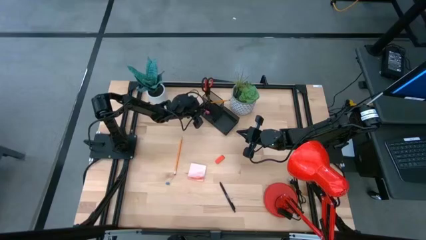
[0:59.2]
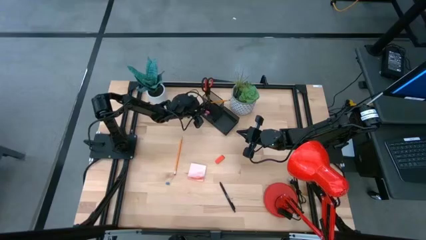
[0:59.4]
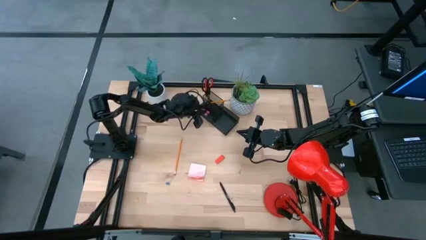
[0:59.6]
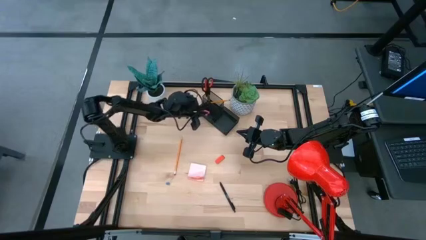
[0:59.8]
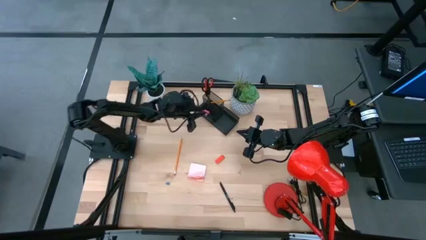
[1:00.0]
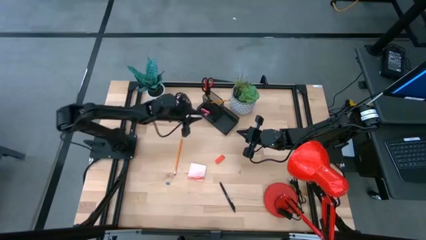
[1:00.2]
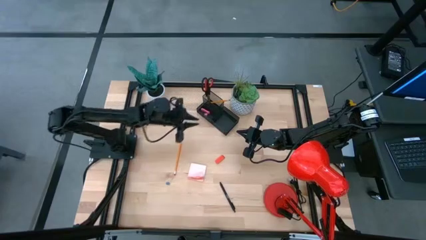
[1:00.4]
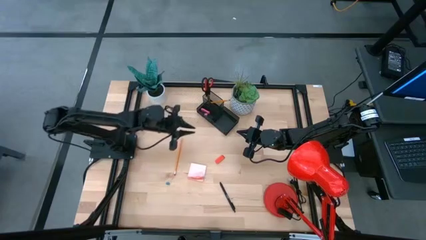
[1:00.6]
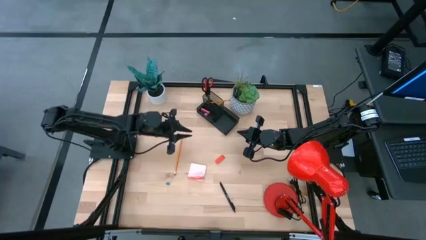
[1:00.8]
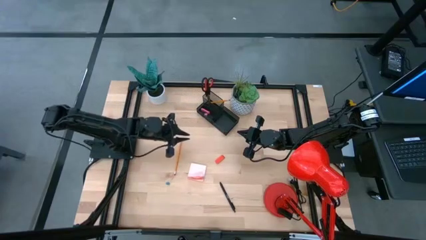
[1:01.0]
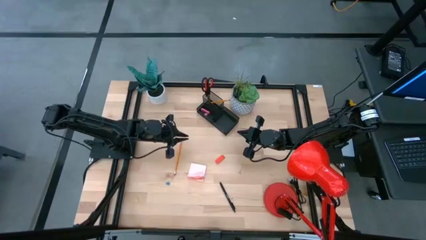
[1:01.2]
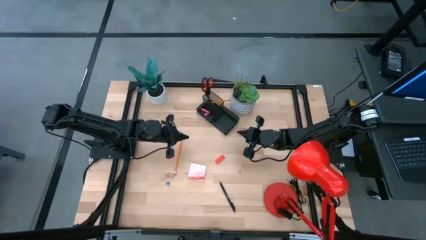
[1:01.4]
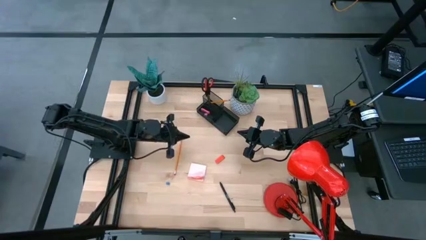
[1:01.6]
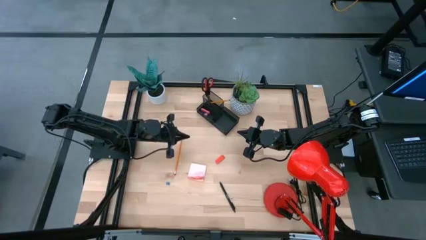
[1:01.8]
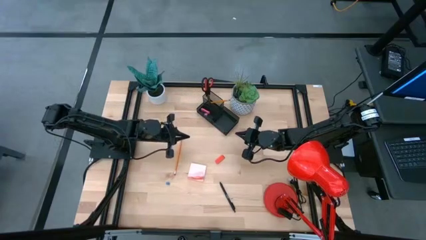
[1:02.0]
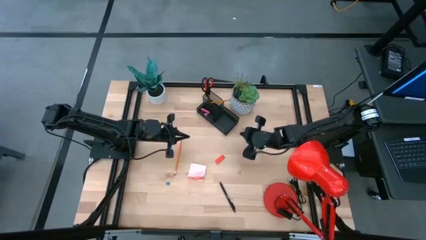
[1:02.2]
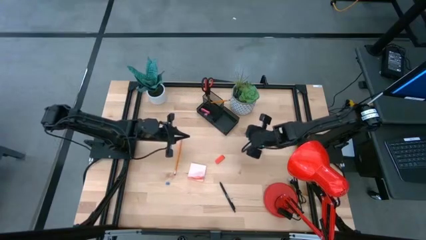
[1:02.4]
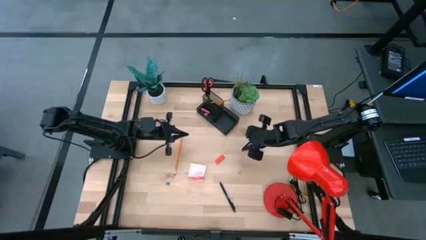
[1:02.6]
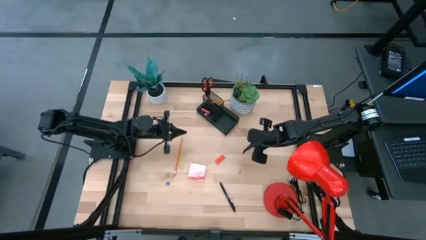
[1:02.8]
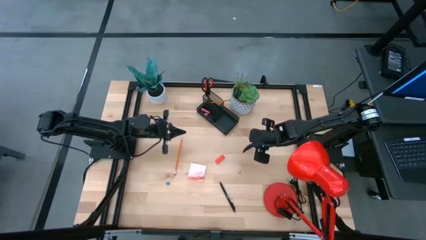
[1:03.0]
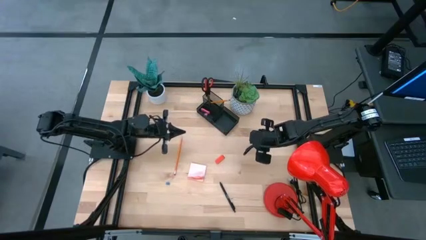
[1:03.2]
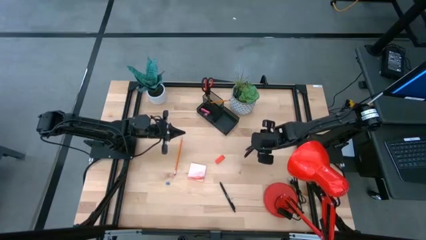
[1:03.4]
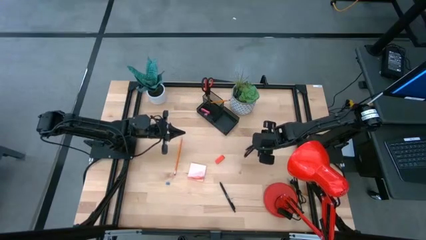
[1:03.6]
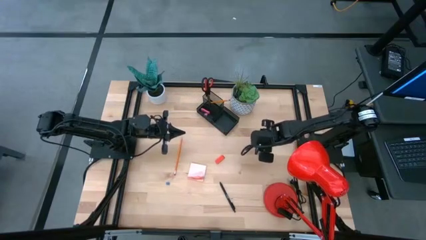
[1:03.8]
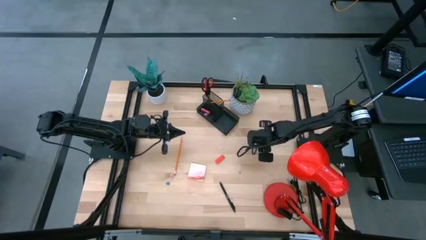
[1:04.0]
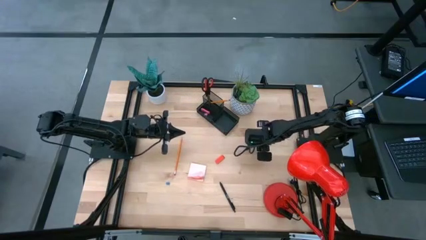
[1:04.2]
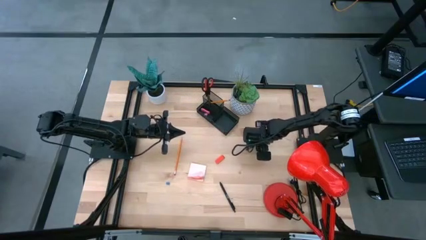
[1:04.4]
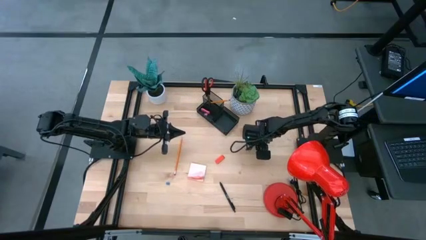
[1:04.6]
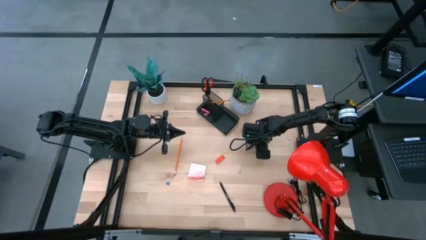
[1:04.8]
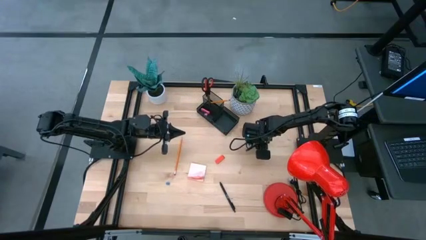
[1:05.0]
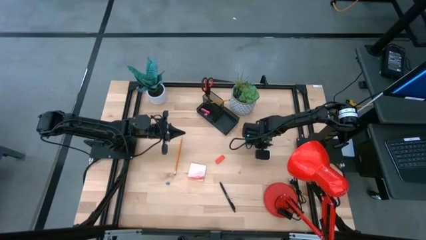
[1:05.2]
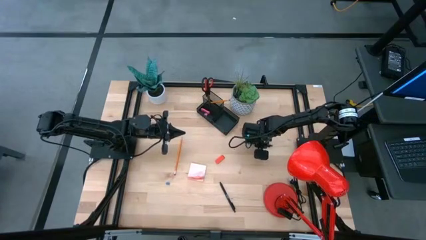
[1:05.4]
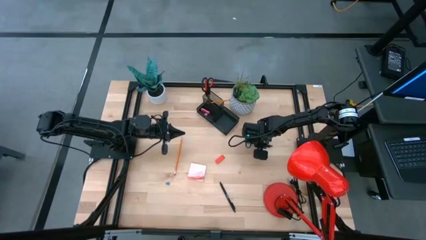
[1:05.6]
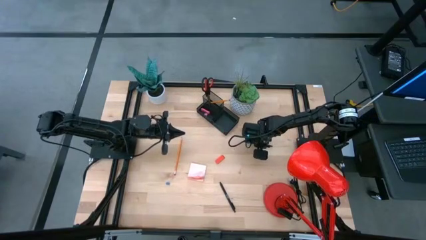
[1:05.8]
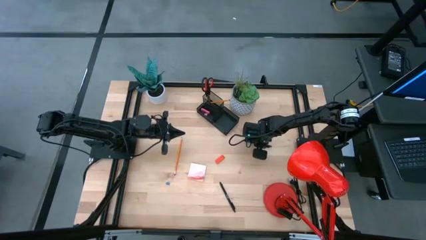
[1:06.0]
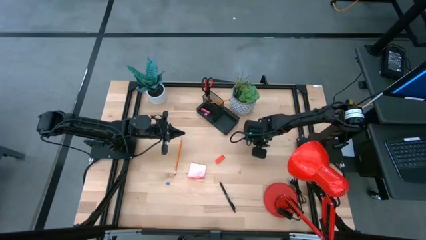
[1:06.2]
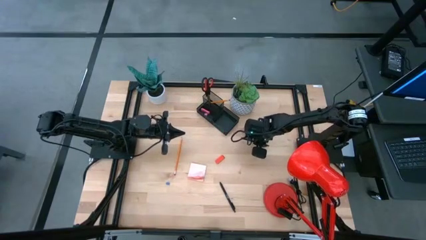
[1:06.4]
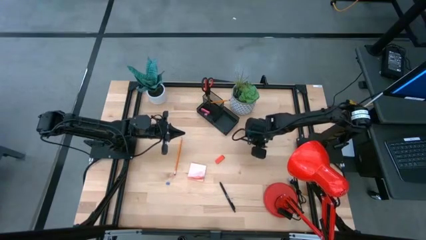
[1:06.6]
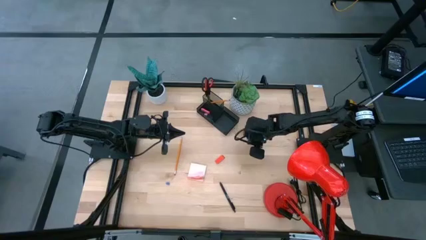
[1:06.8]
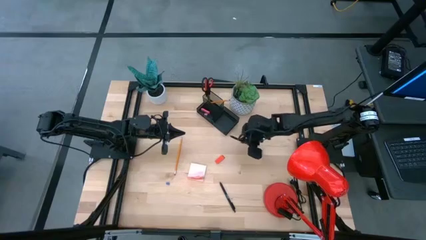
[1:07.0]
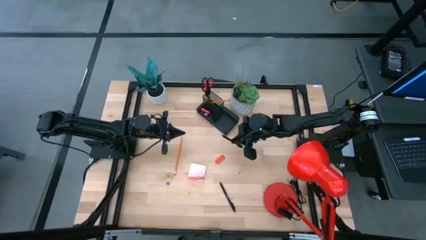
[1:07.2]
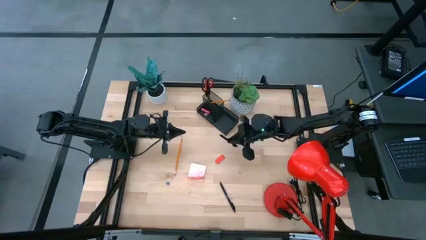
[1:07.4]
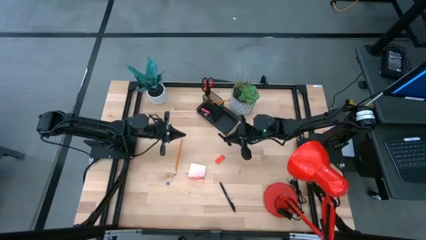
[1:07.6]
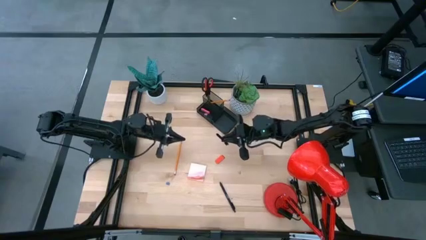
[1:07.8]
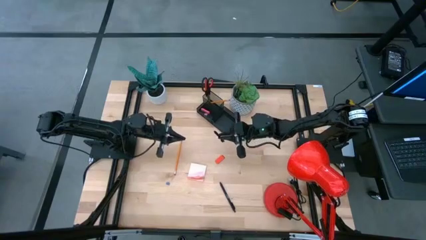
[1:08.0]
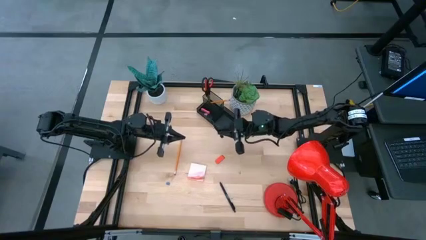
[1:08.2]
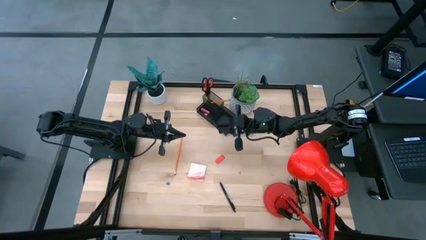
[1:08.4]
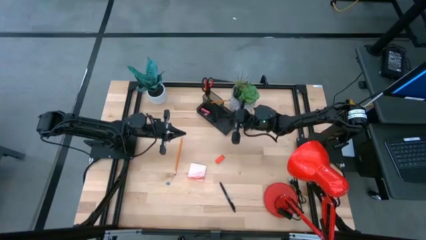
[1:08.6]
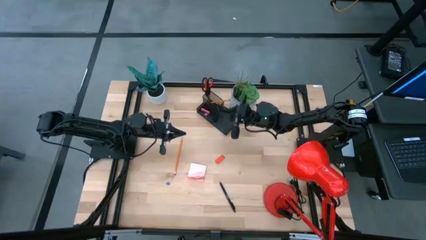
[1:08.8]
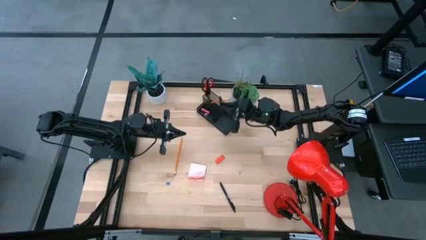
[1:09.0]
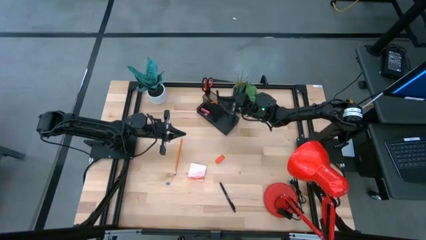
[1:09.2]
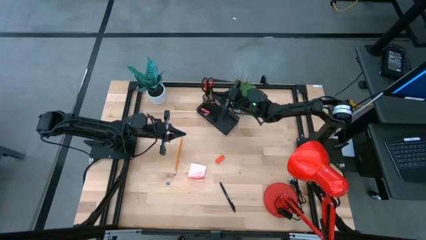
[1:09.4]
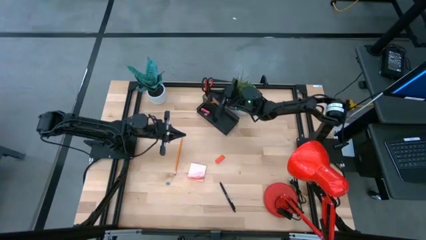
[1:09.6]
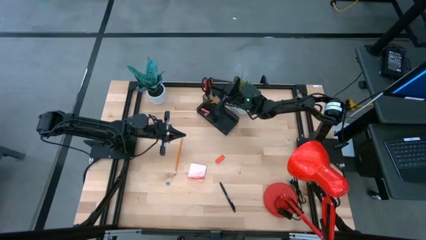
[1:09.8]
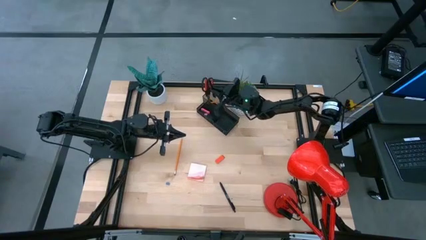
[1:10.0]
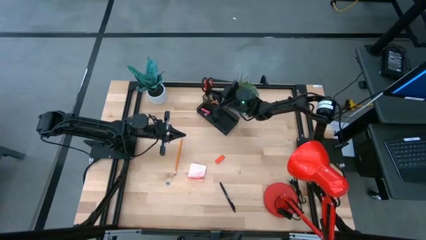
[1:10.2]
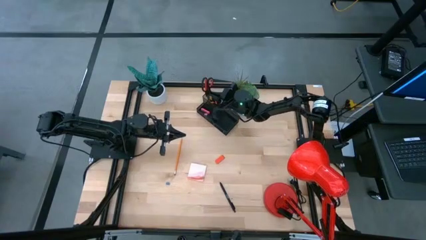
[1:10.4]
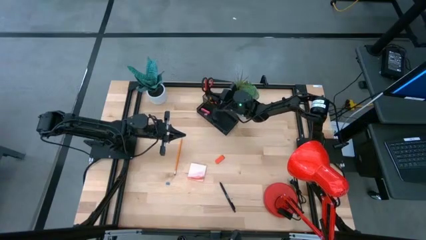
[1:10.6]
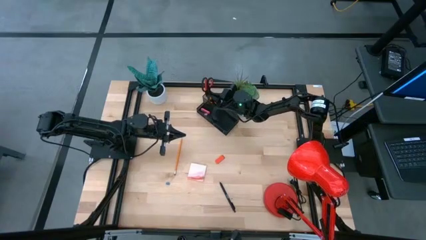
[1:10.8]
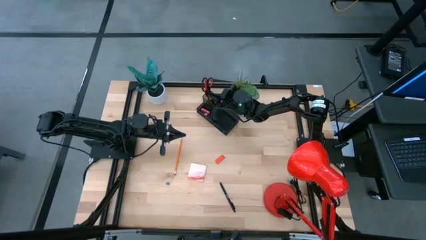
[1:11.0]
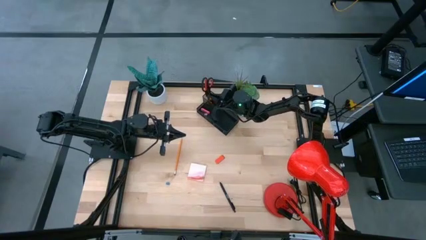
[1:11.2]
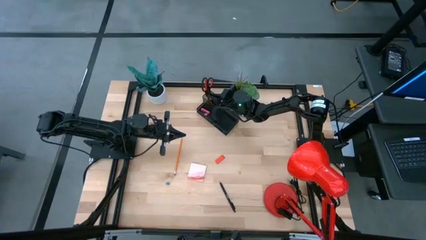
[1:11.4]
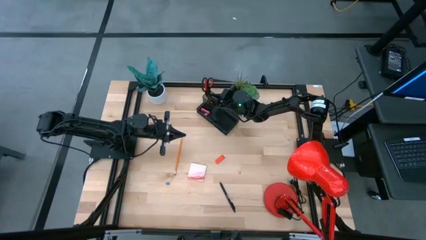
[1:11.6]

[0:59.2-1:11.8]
Task: Pick and place office supplies into organizer
Put the black pen into the black desk organizer
